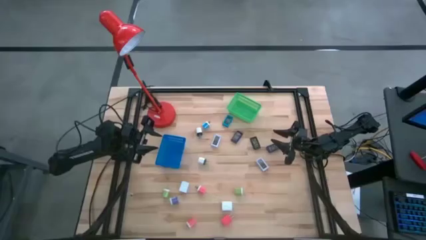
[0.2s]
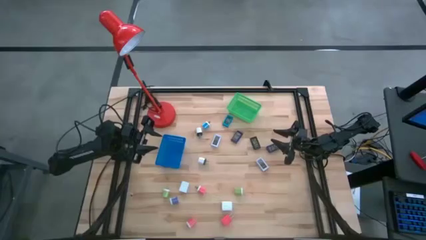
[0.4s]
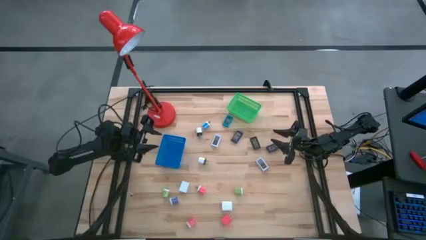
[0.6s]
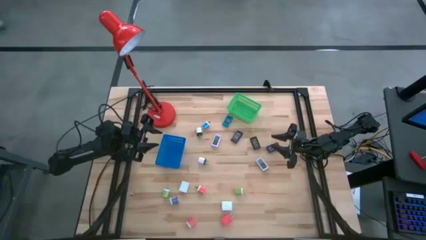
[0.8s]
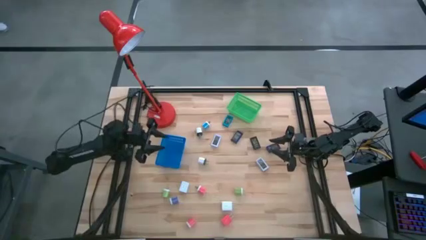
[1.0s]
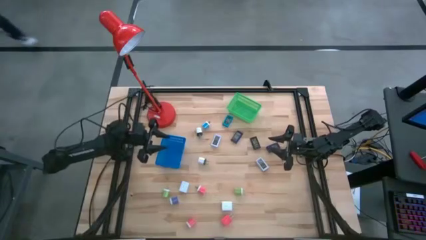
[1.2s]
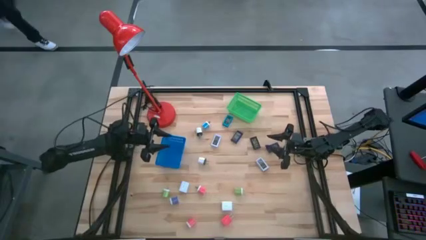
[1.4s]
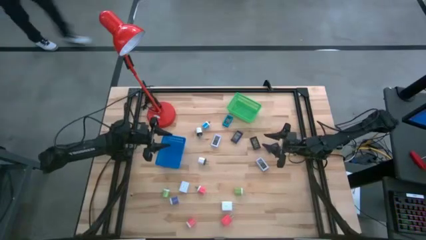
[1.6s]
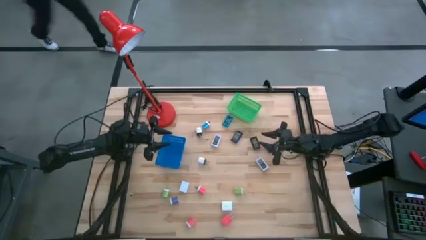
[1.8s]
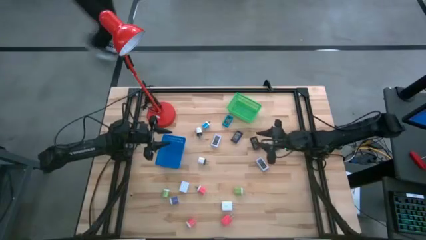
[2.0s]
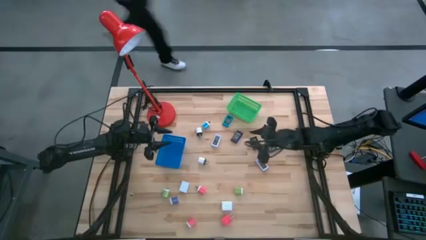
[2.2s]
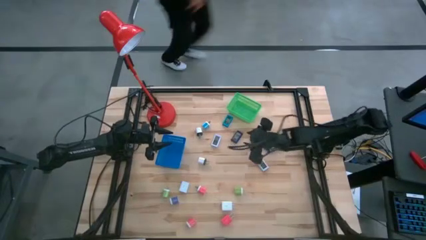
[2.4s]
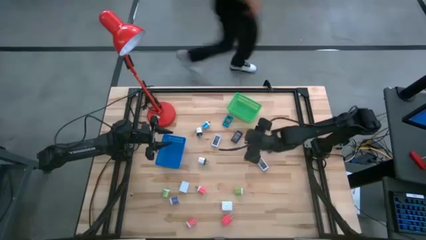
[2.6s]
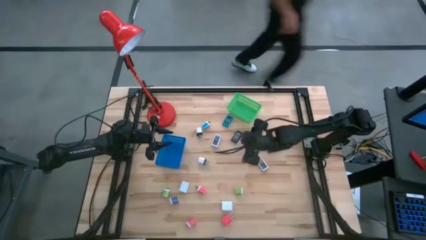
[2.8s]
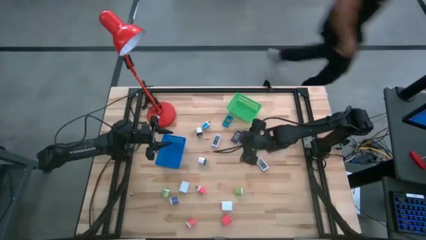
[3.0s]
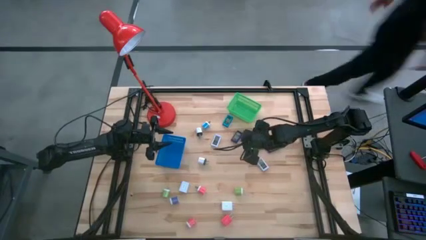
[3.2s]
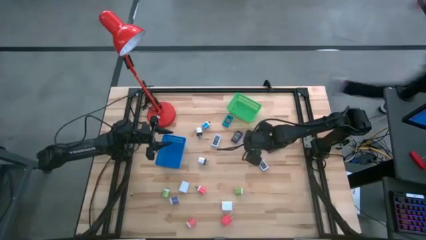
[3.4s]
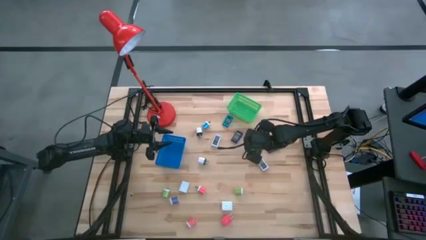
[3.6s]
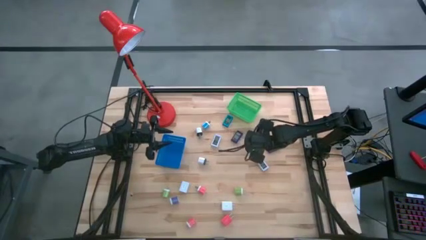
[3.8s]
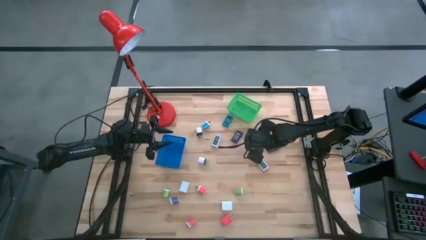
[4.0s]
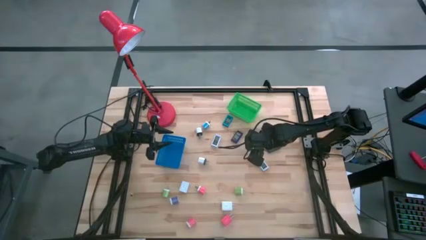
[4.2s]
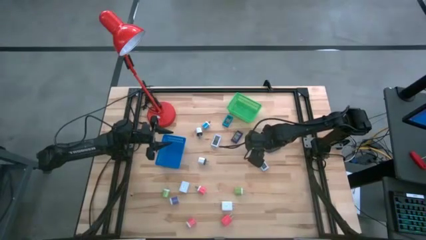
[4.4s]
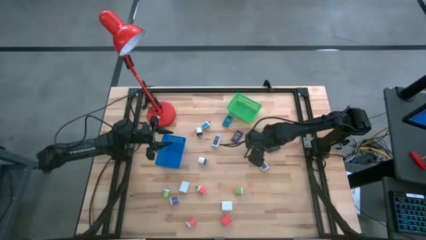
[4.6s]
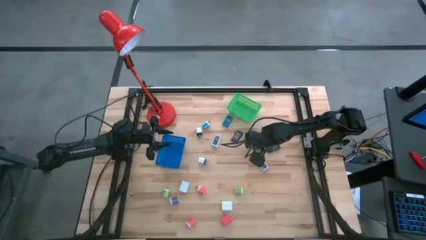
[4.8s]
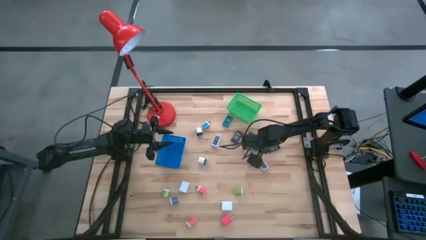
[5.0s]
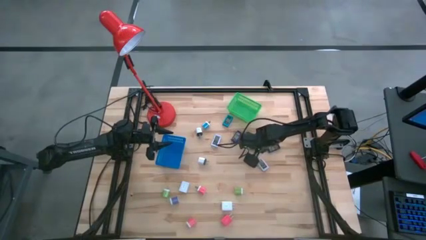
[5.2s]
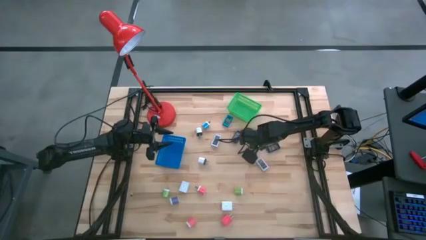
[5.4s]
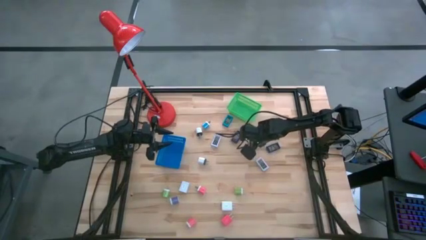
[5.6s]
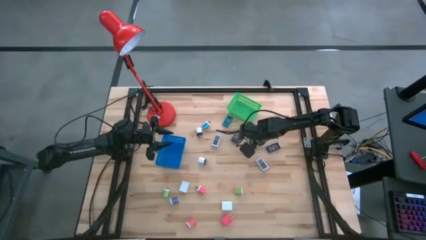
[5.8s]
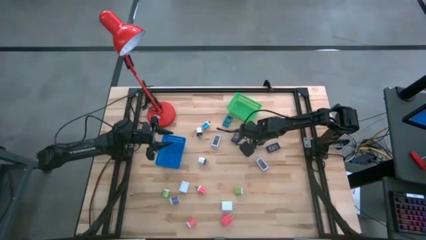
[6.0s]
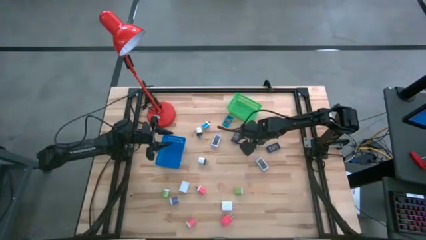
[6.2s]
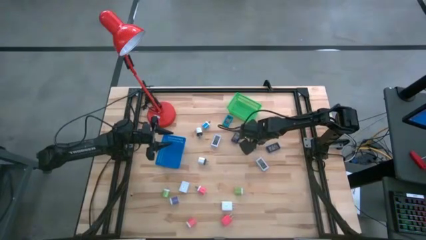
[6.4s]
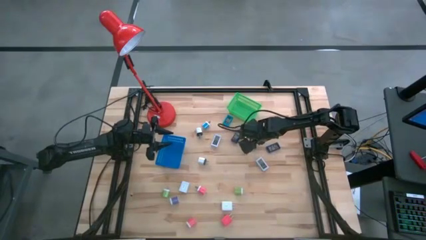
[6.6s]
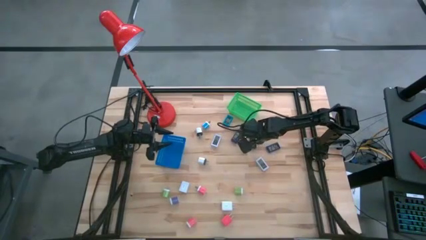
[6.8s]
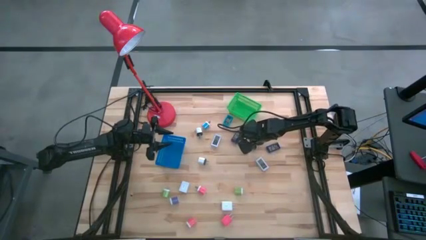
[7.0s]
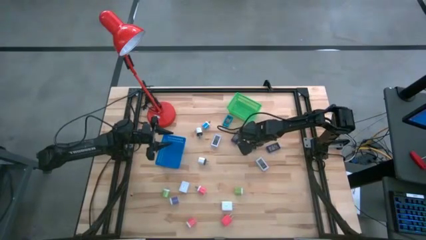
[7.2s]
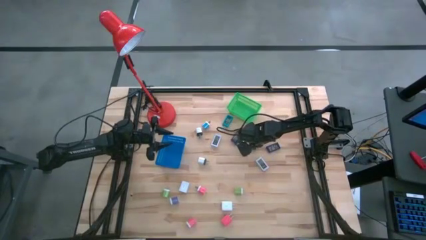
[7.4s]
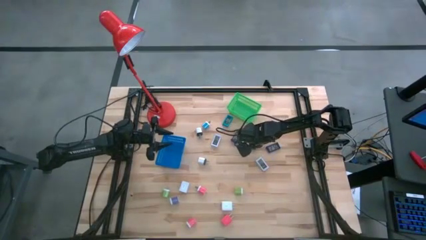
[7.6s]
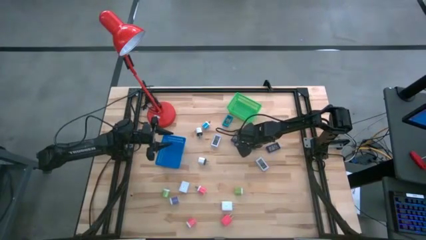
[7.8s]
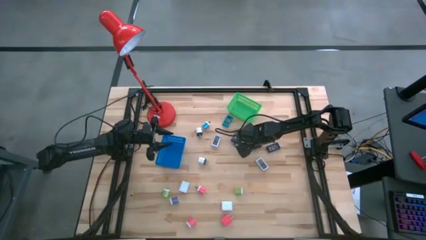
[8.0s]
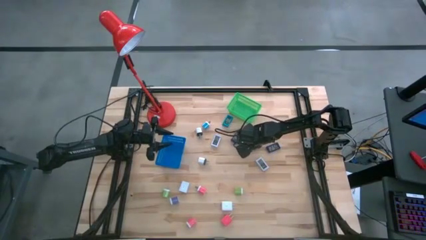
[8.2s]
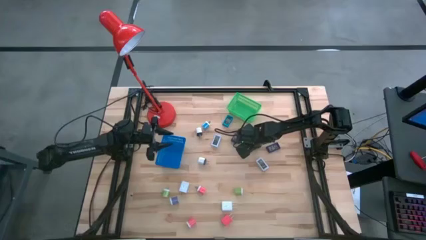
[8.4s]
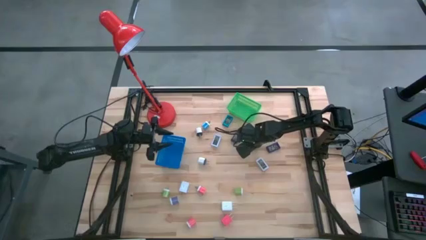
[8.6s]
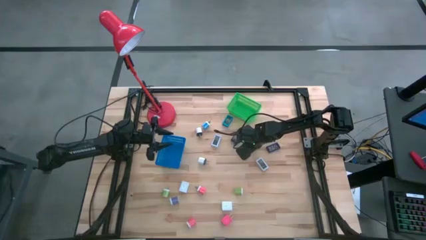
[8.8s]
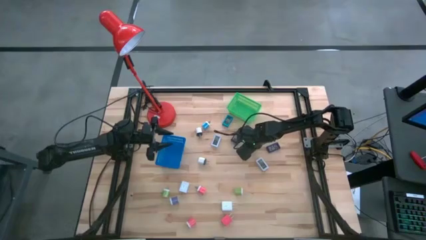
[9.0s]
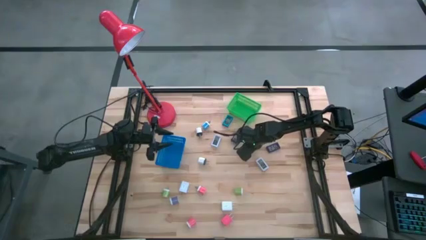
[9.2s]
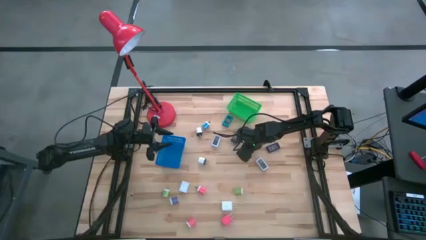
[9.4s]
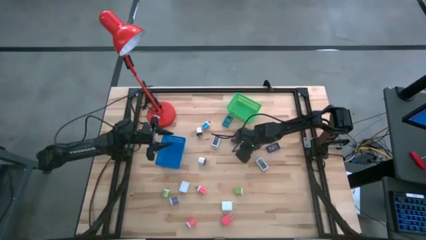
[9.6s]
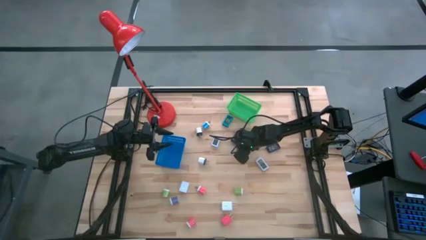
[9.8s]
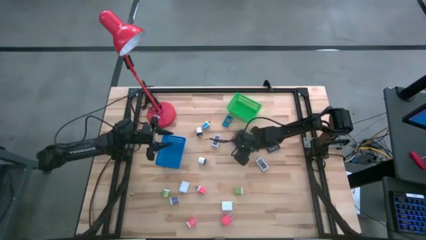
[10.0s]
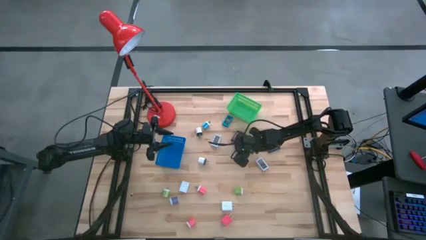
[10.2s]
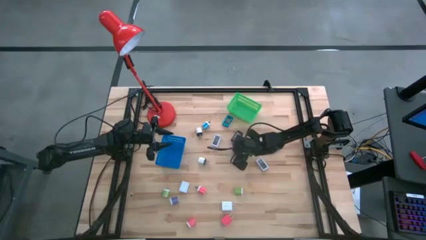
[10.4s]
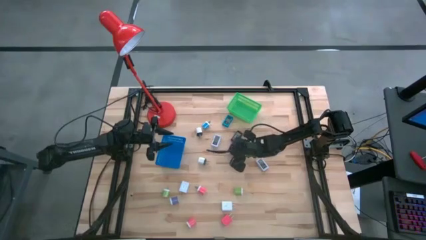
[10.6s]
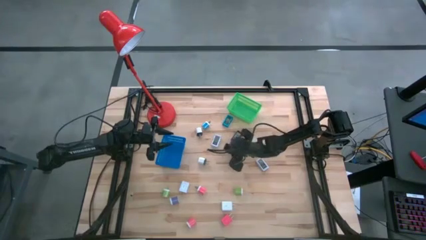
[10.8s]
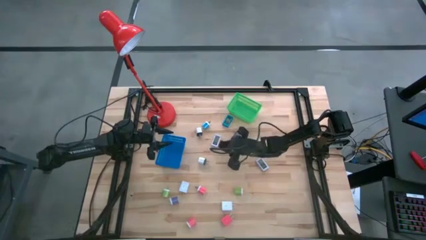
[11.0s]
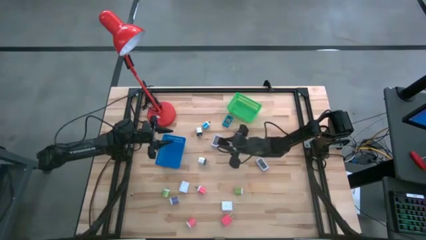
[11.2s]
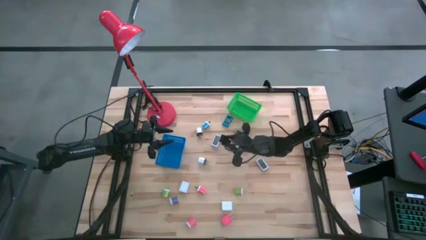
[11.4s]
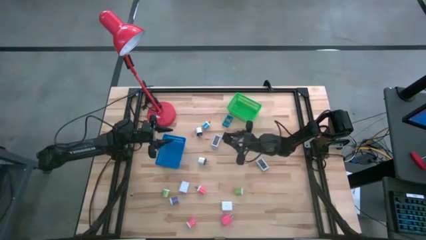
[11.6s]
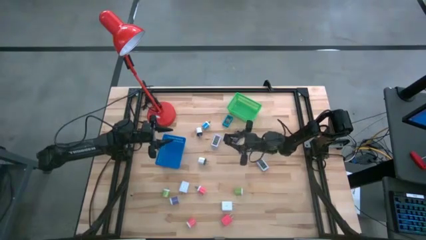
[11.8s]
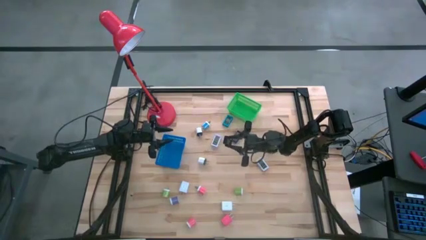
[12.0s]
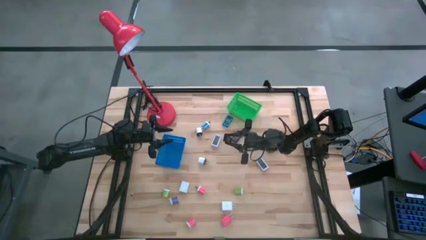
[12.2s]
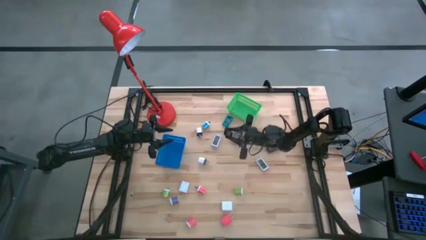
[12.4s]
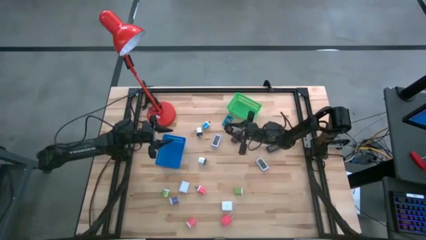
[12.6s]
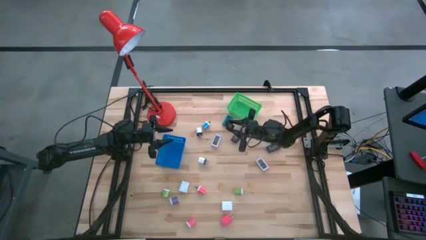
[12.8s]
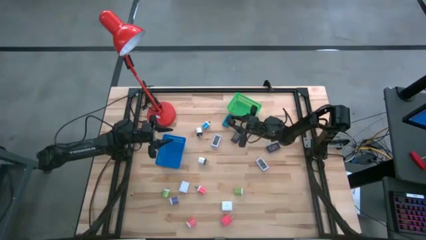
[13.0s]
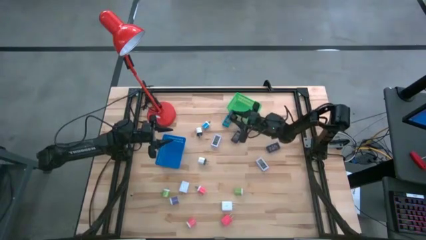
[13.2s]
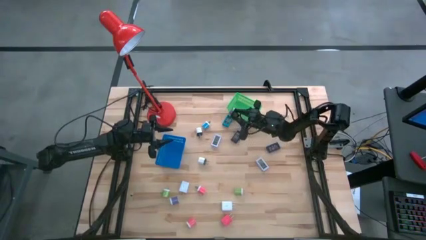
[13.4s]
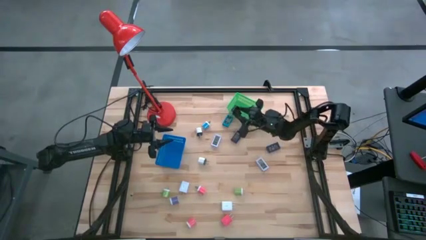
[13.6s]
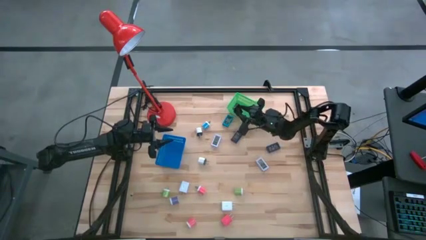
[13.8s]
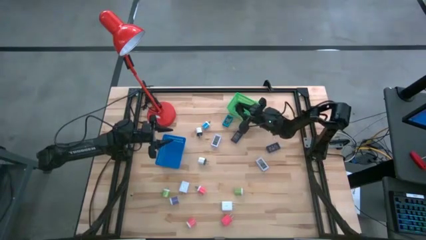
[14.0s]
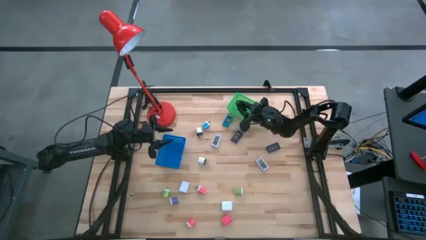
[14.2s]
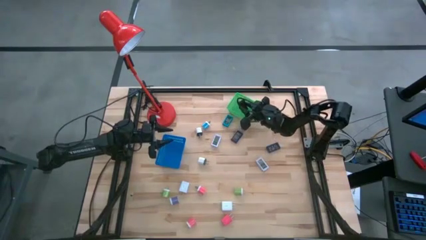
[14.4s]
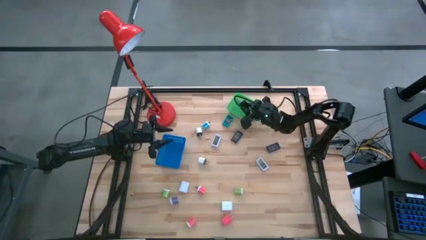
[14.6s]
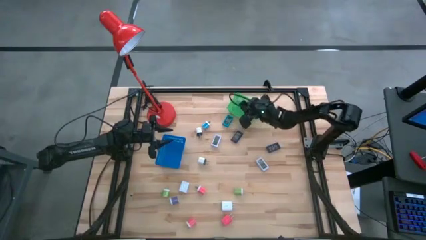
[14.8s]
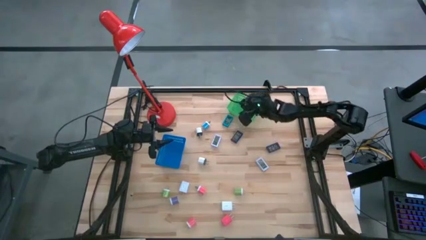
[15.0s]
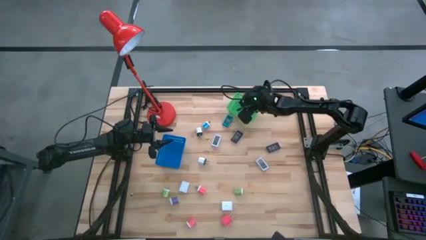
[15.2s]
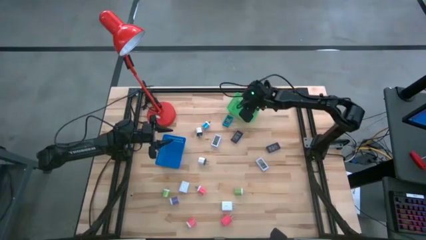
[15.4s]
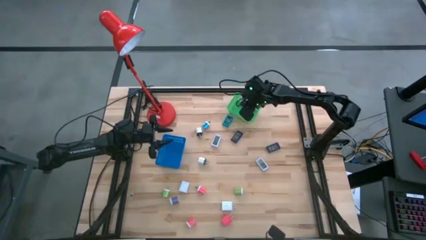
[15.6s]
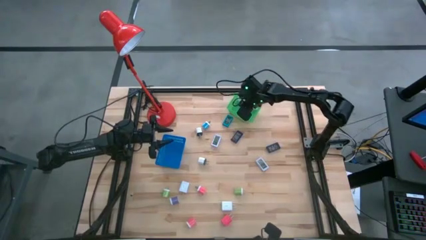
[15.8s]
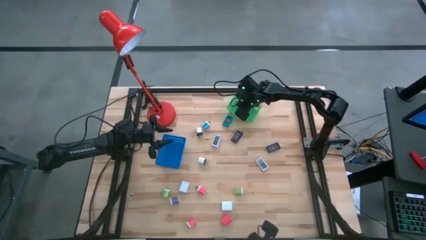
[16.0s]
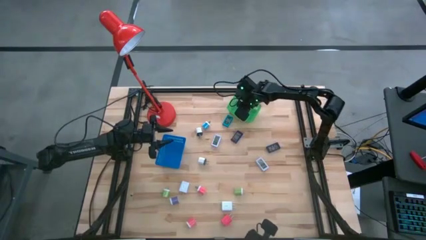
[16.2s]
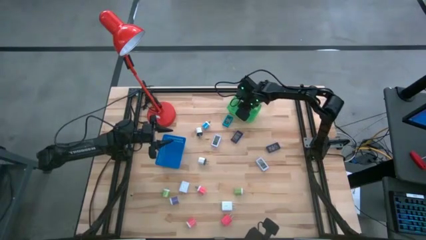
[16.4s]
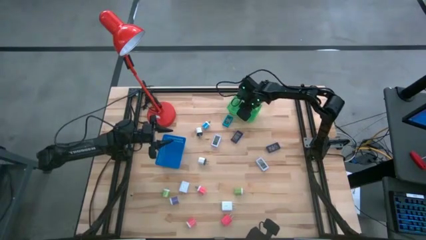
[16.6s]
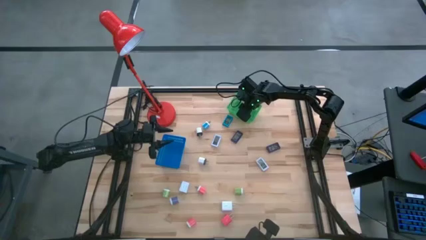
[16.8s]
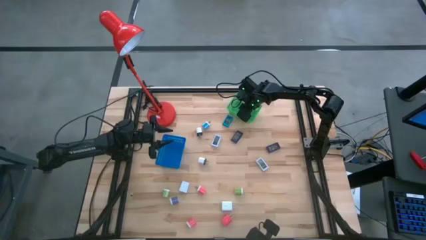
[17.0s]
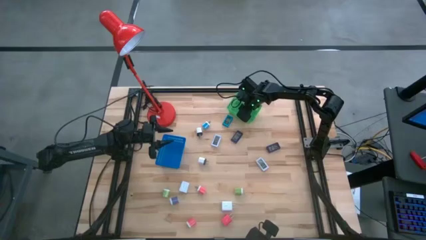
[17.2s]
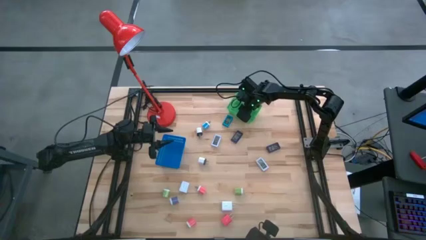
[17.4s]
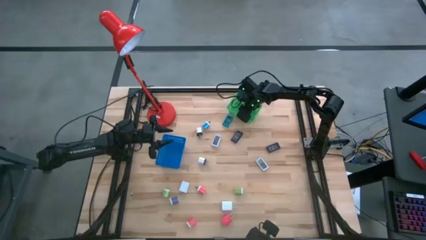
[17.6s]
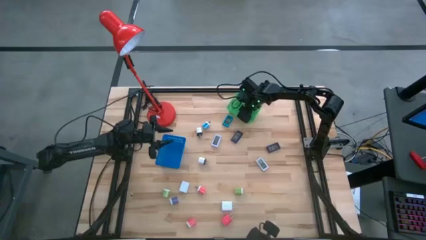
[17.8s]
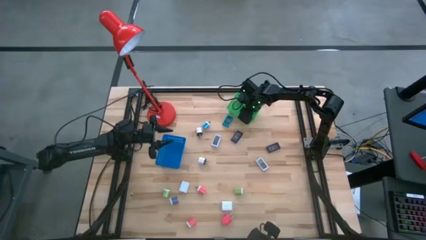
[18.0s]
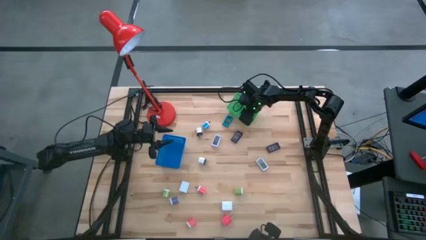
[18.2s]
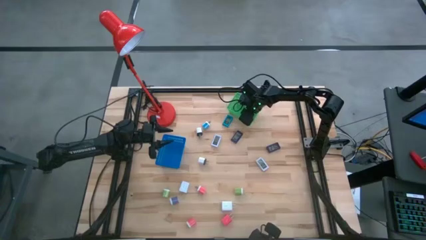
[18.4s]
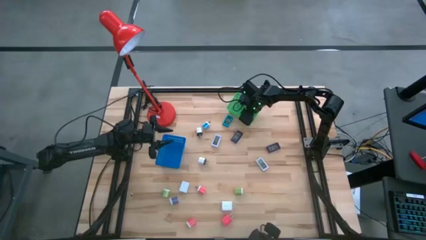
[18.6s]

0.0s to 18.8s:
Task: Pick & Place Office items
Put the black digital clock into the green basket
